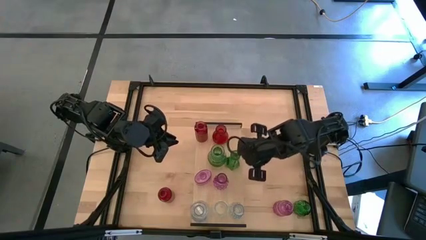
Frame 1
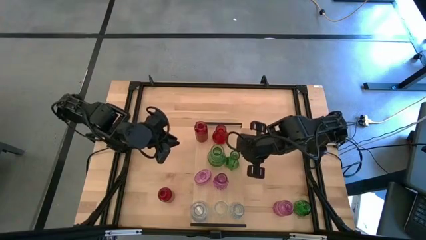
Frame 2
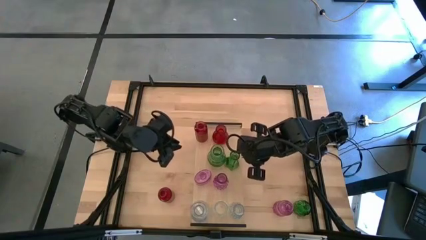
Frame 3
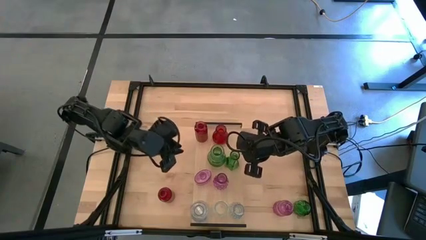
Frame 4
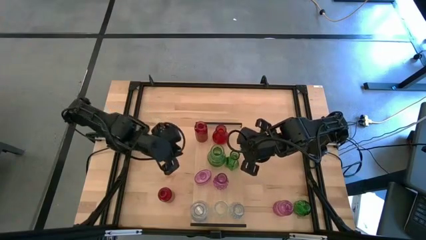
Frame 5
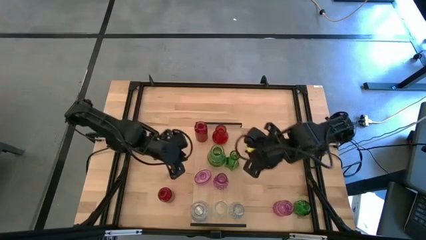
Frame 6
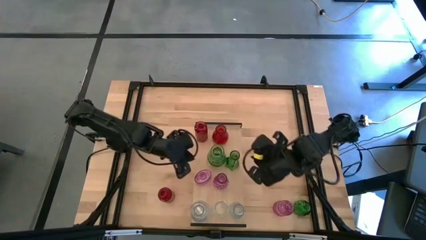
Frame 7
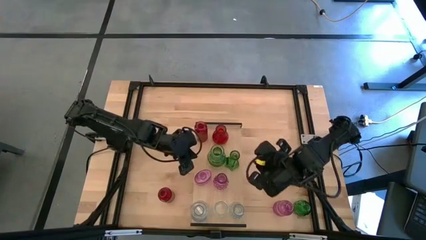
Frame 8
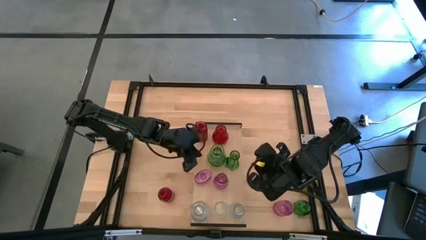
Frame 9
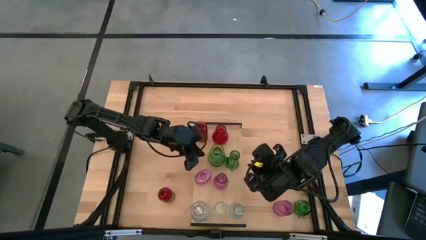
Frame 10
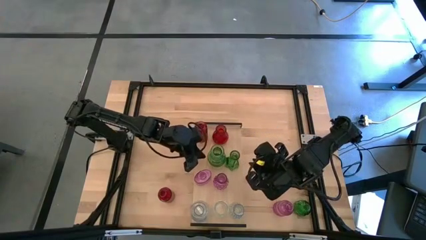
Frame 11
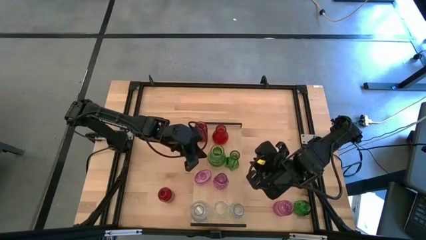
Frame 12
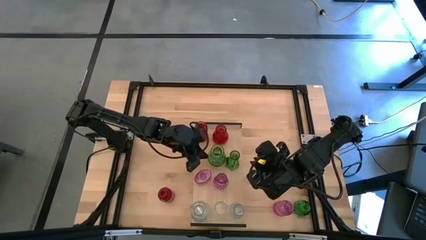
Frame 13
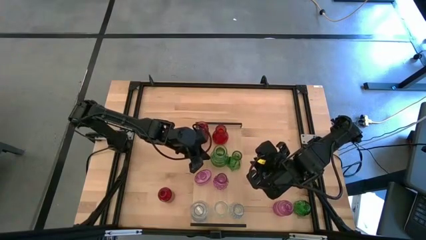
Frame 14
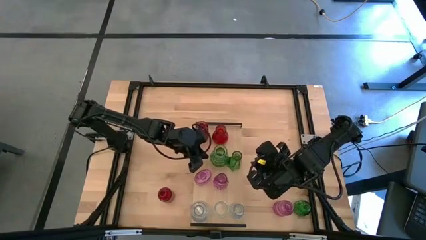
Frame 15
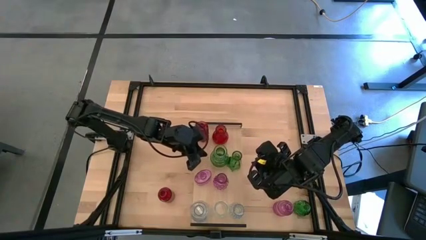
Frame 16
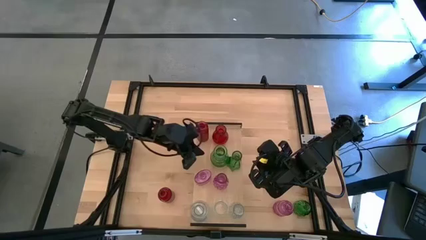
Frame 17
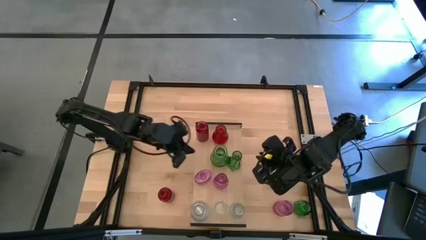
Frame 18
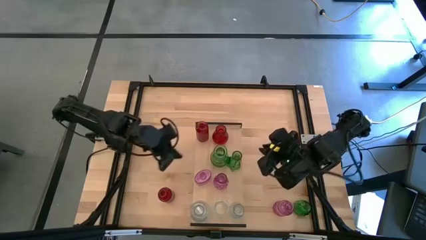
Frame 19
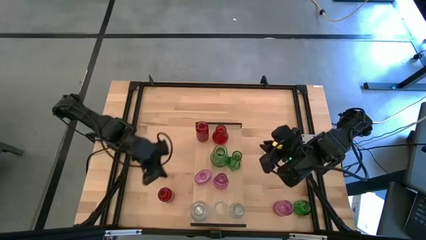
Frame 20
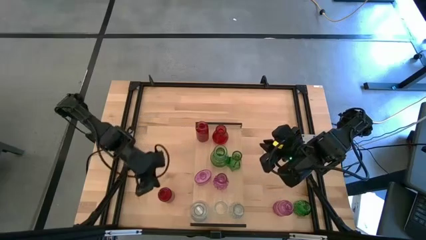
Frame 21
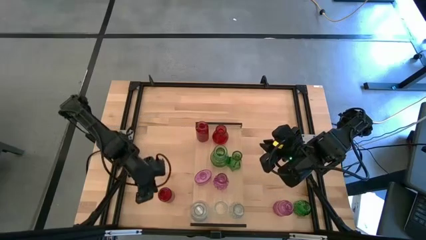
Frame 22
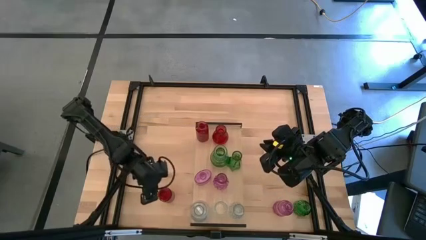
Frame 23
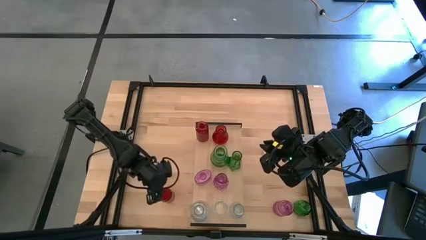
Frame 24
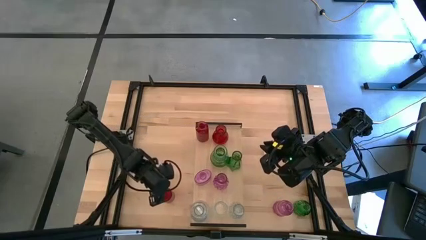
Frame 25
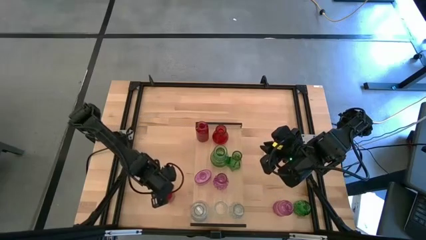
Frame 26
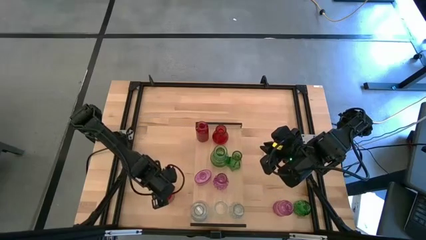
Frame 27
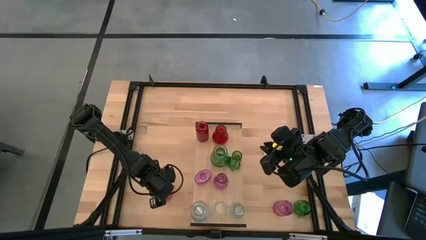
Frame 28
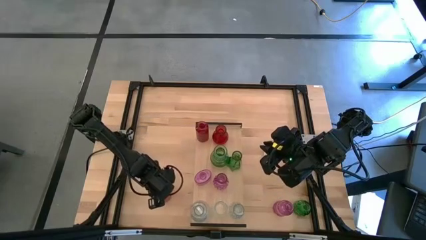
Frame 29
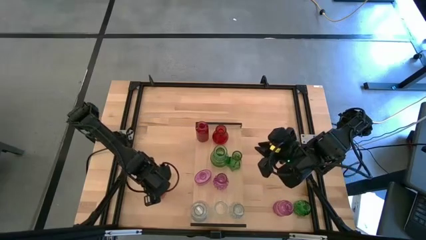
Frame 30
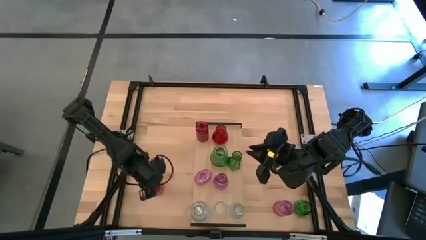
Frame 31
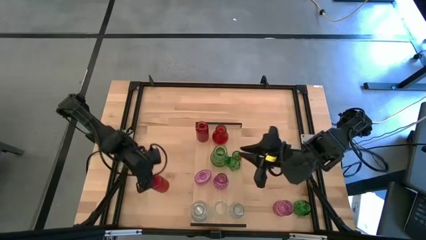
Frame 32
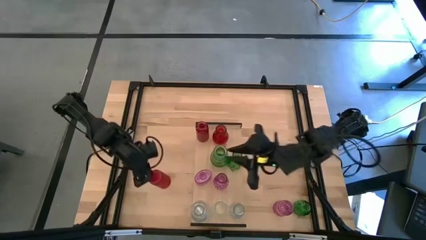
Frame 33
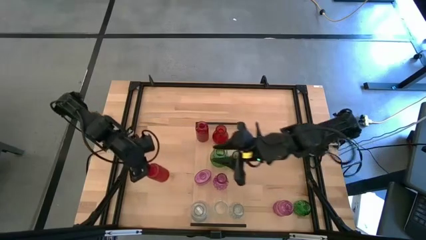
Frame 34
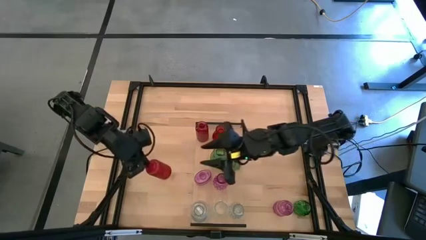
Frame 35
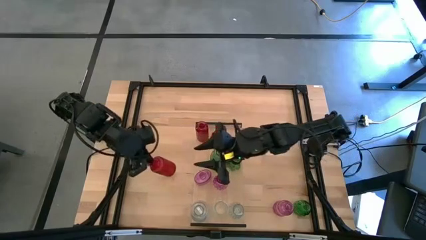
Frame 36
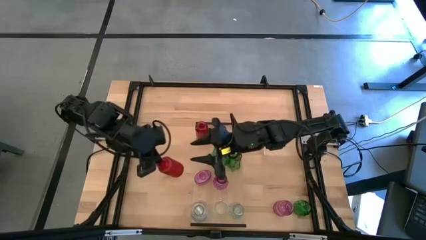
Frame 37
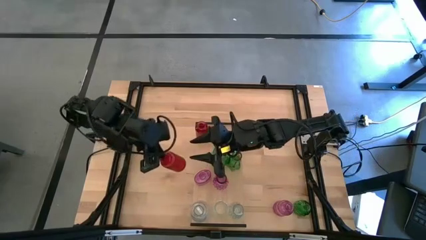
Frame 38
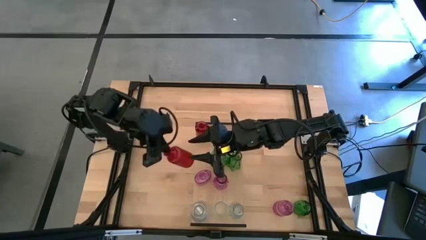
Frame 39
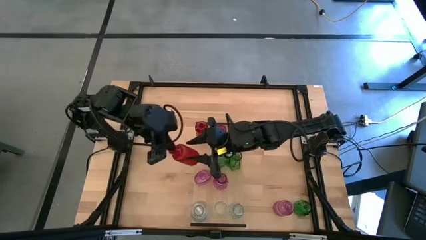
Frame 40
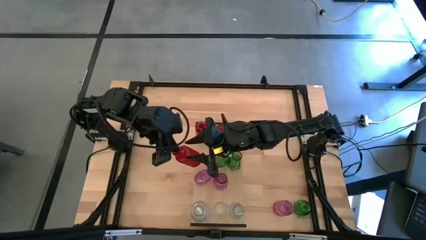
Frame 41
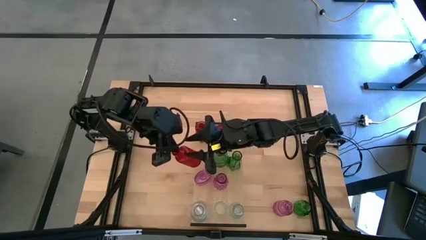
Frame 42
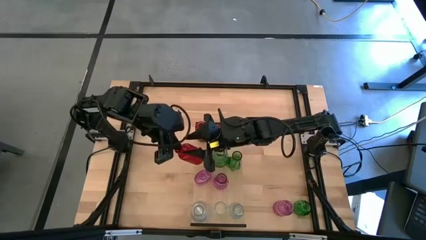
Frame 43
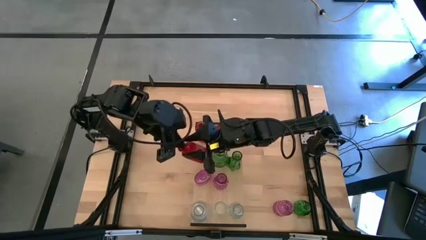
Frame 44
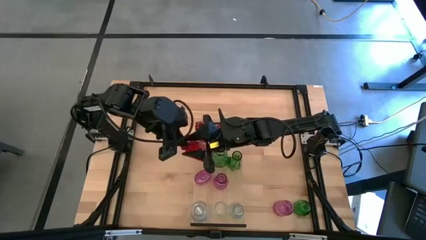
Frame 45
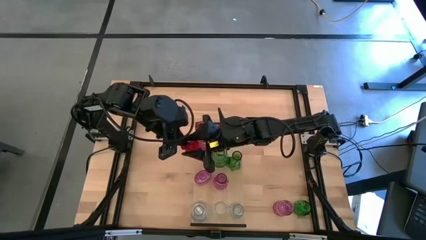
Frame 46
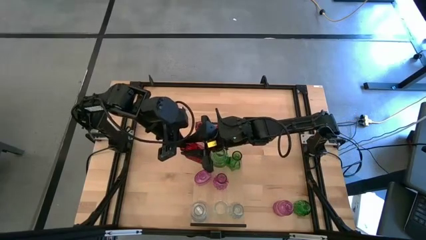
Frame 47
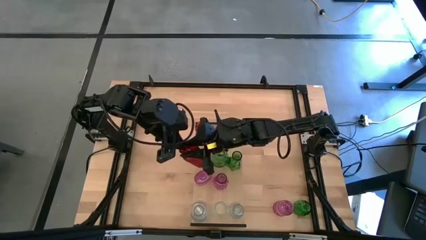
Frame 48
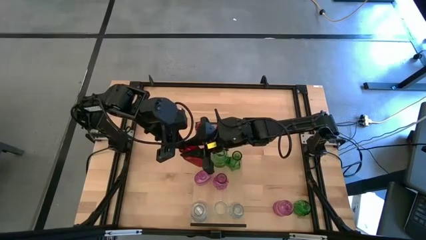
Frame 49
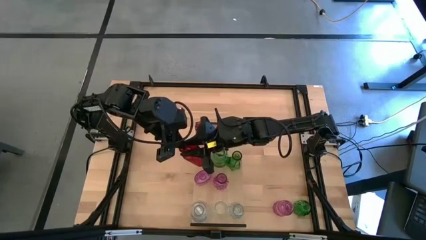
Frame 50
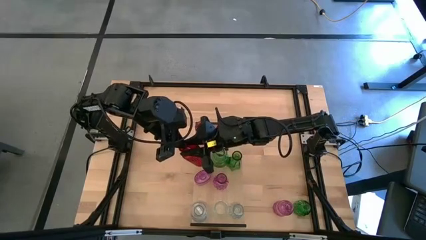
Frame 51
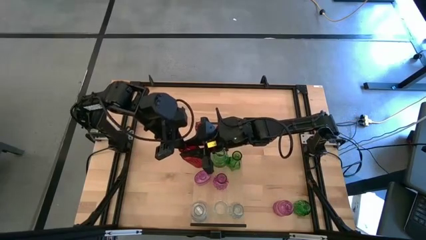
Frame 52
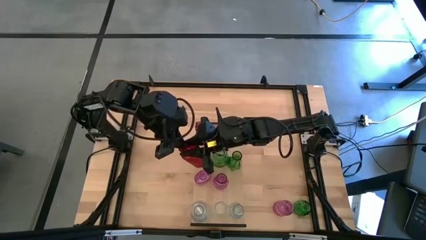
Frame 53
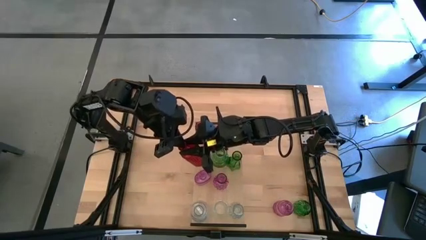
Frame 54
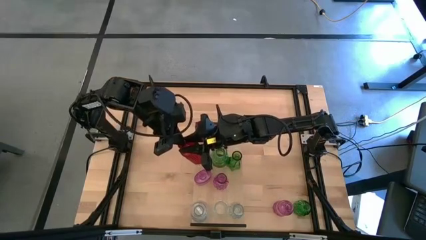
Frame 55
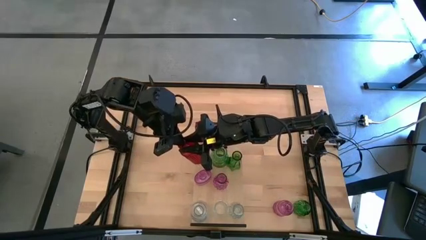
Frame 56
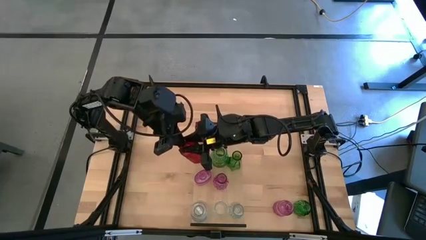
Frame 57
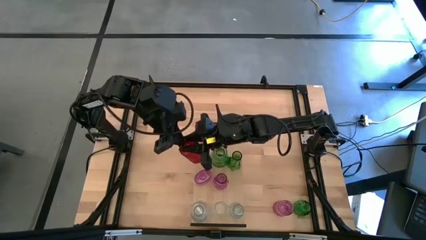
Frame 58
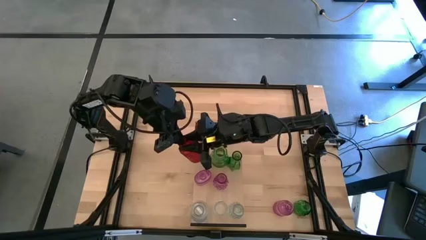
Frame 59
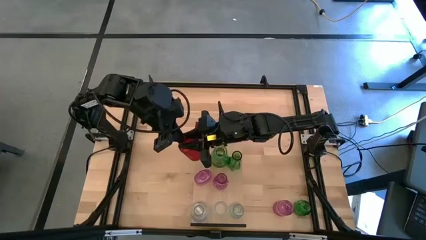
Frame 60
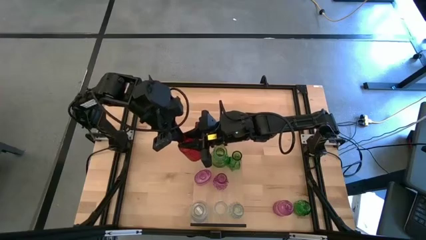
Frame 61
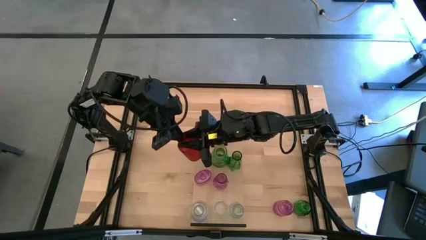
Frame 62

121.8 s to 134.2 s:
Task: sort vases onto shelf
Put the red vase on the shelf aligned with the other red vases

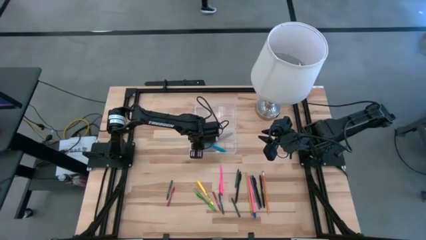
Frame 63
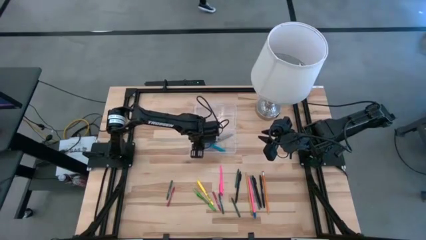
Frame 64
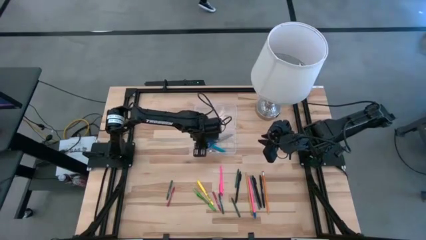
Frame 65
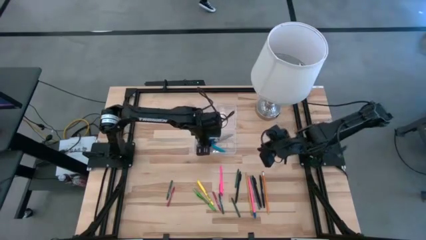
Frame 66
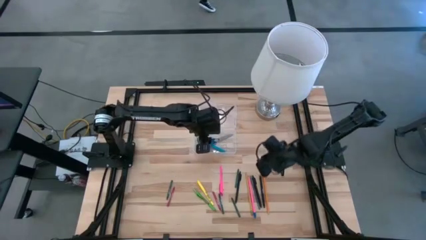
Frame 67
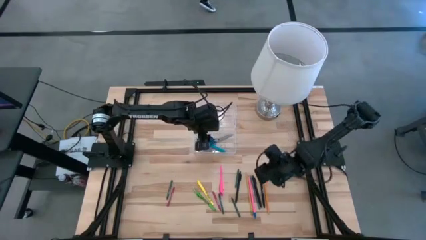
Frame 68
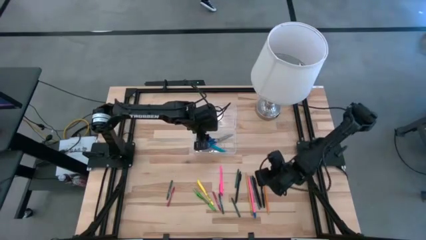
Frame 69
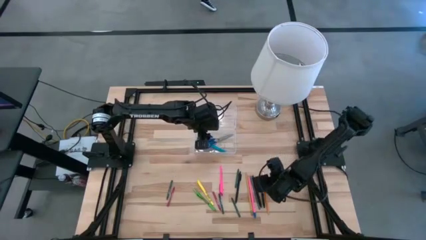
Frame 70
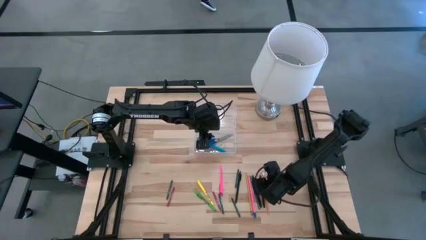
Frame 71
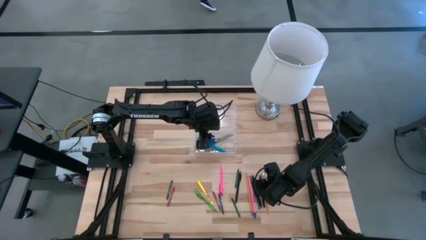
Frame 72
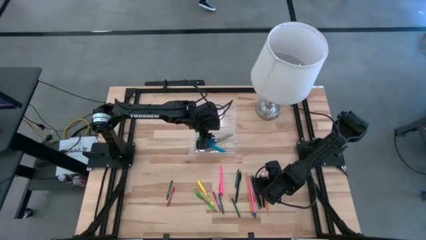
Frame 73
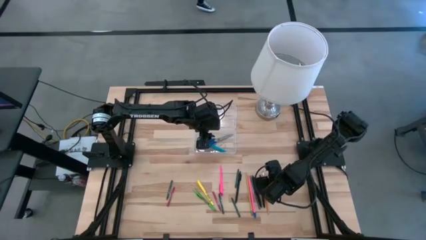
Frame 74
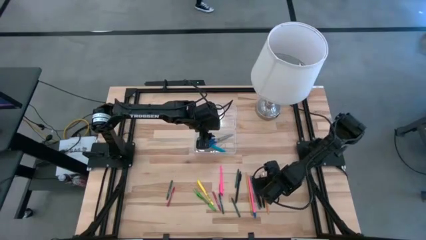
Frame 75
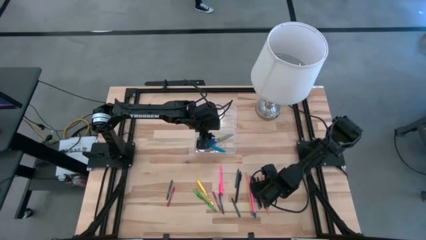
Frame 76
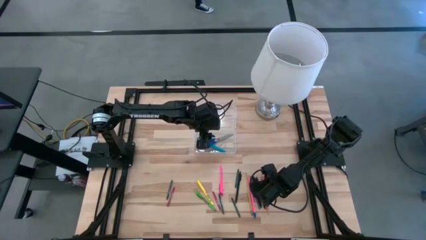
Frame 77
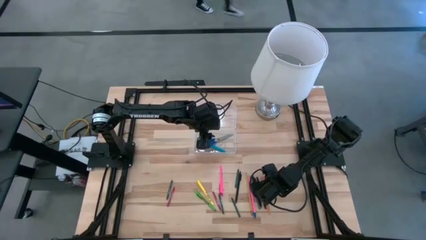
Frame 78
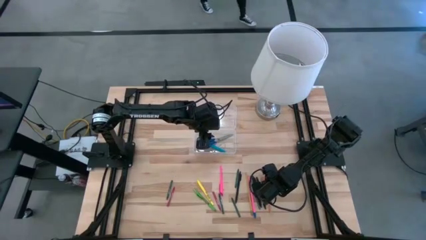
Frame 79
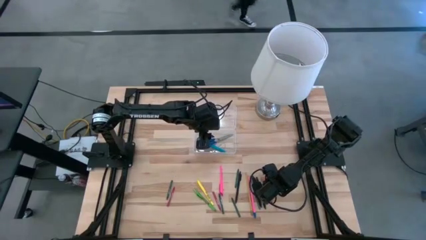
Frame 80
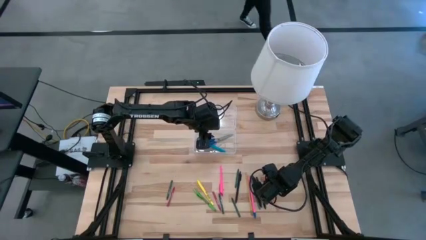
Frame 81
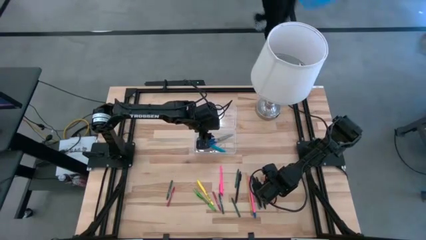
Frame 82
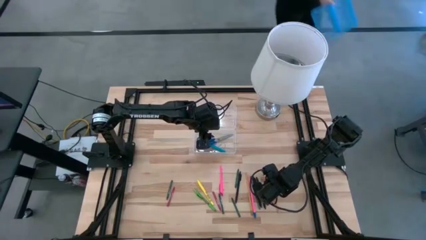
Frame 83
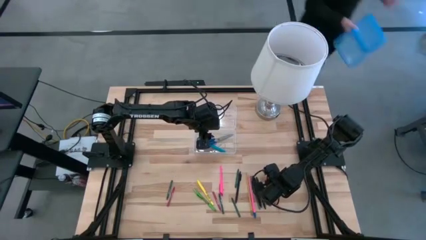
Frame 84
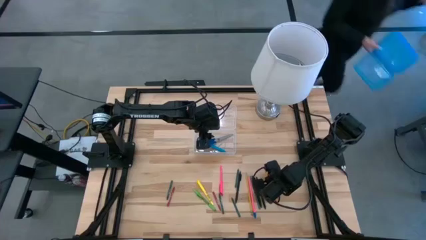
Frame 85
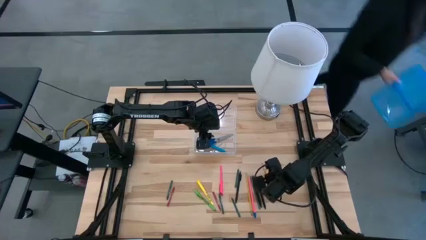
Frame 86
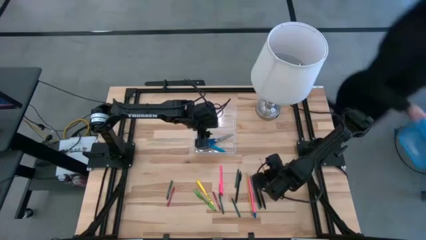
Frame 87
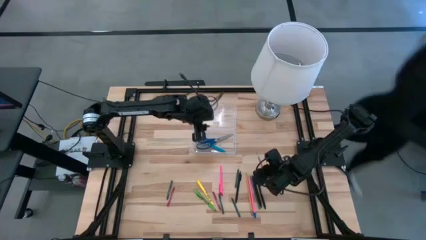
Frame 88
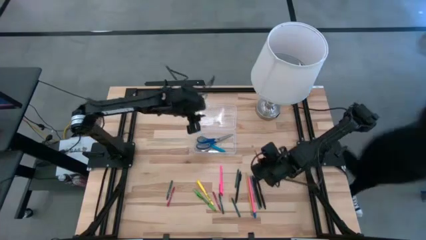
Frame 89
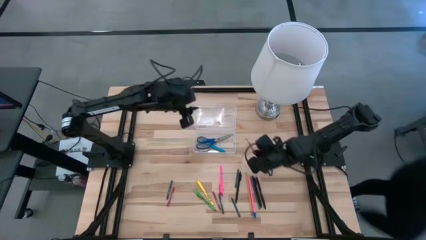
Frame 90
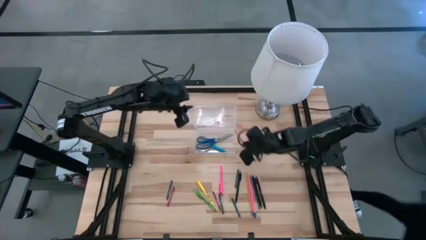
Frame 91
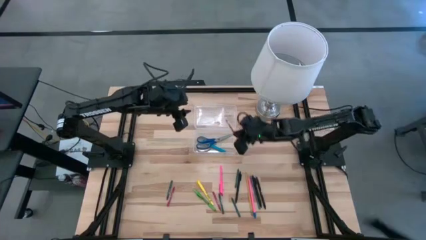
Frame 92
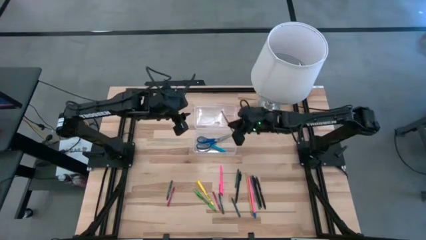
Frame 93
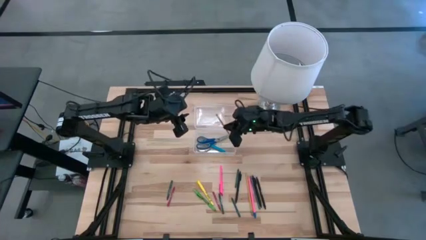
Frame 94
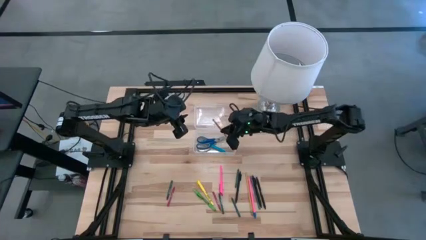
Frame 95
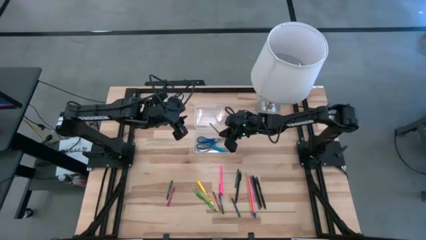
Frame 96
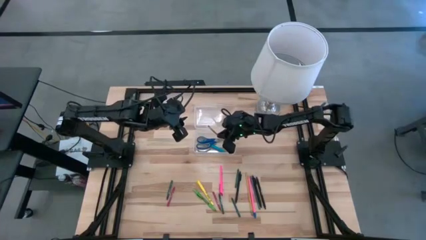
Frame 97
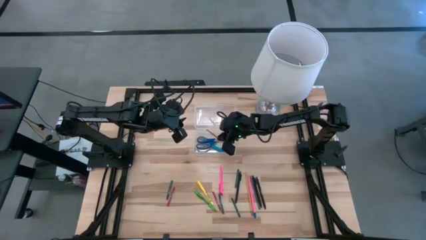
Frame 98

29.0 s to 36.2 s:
Task: Pick & place school supplies into a supply box
Put the orange pencil into the transparent supply box
